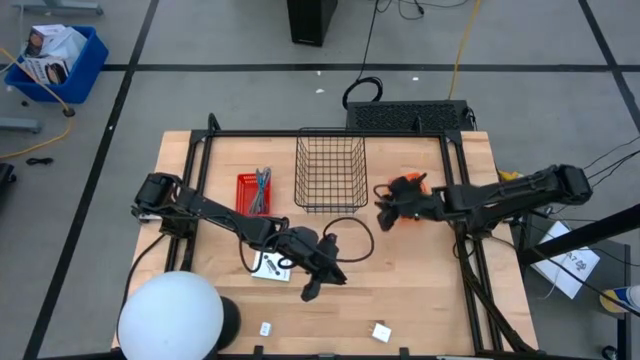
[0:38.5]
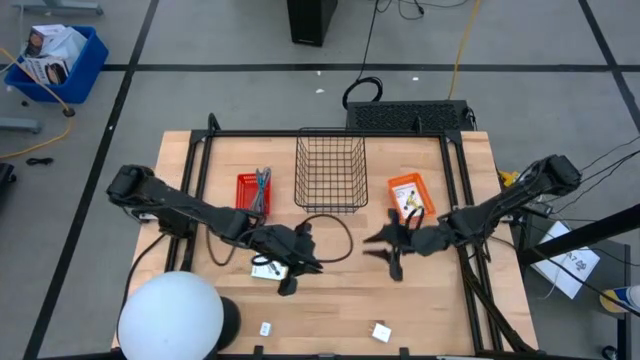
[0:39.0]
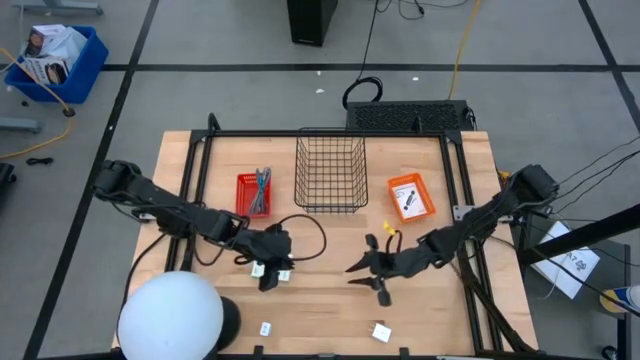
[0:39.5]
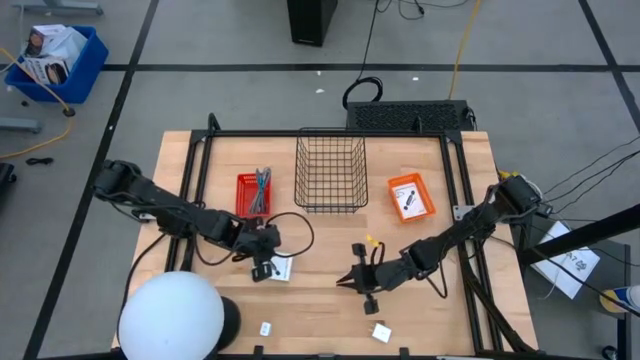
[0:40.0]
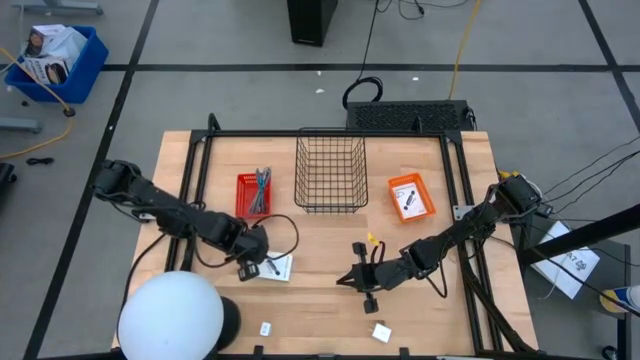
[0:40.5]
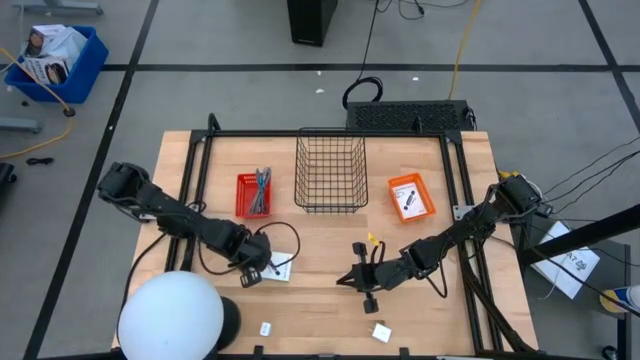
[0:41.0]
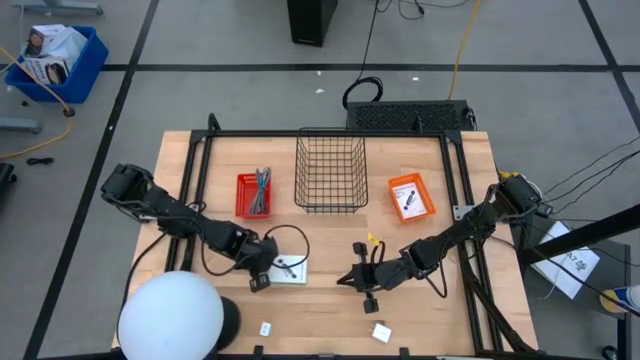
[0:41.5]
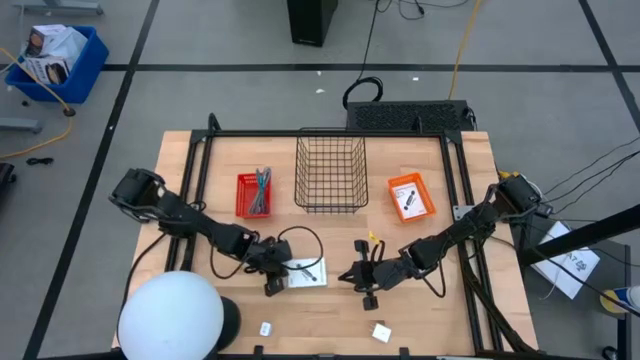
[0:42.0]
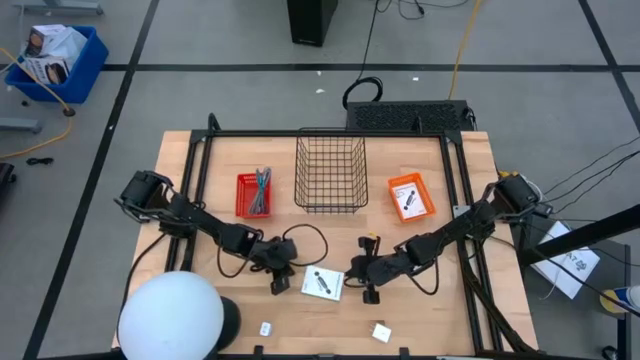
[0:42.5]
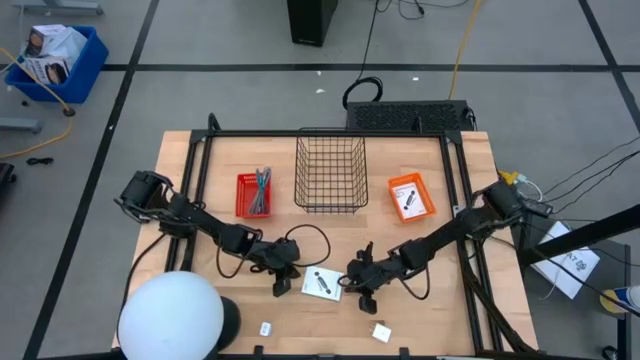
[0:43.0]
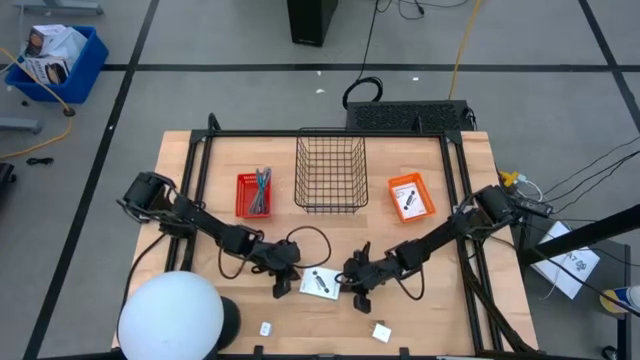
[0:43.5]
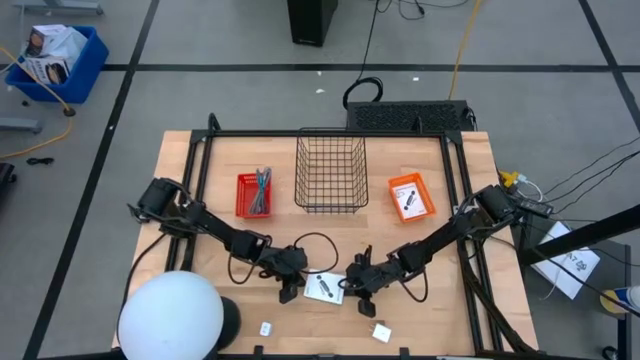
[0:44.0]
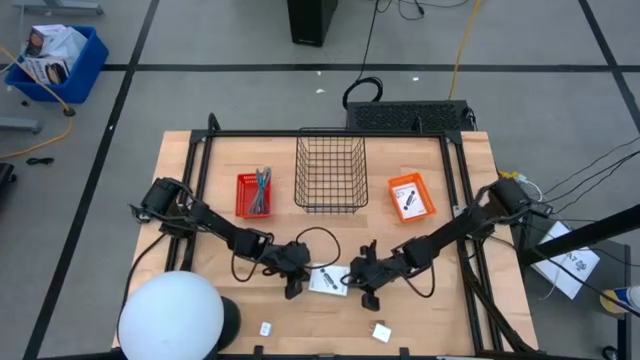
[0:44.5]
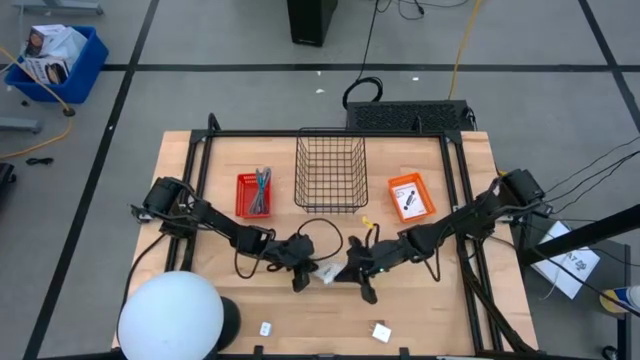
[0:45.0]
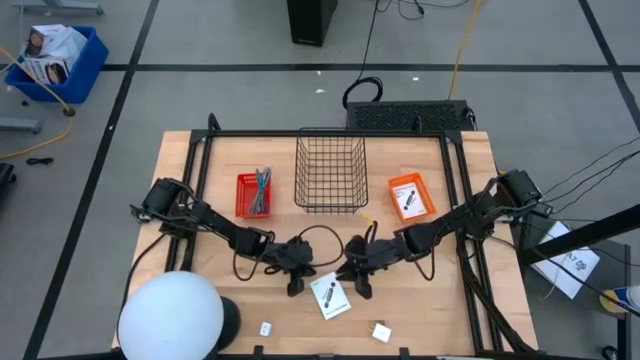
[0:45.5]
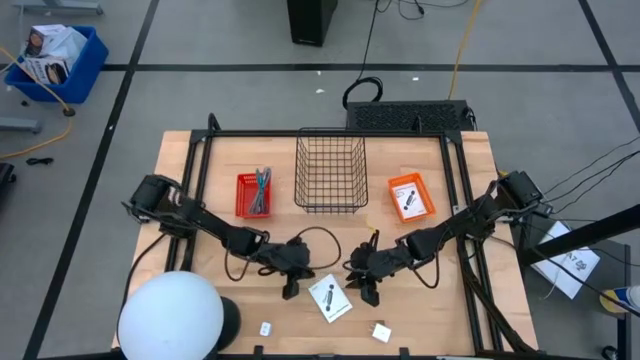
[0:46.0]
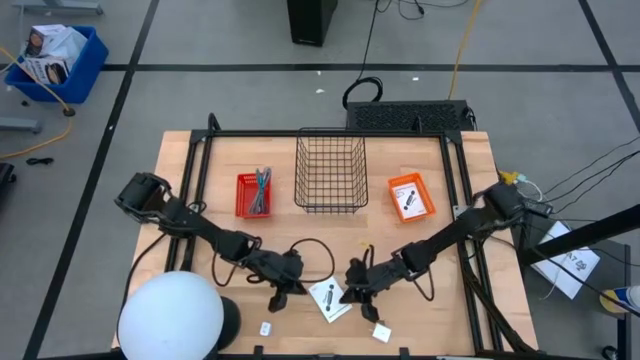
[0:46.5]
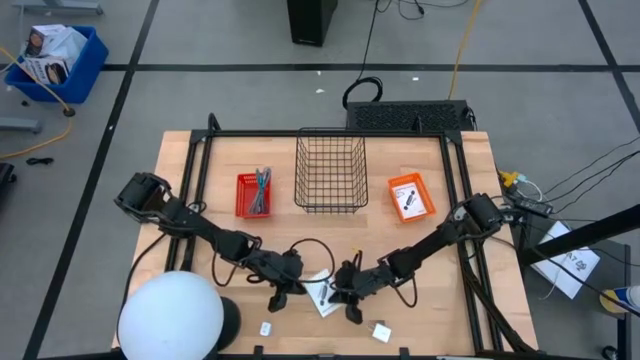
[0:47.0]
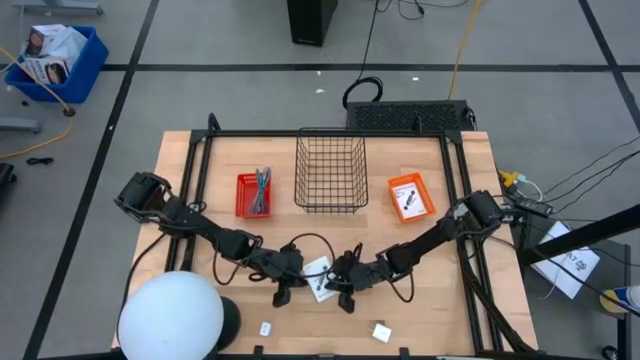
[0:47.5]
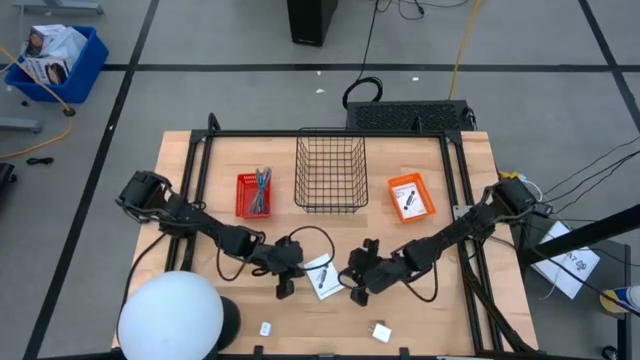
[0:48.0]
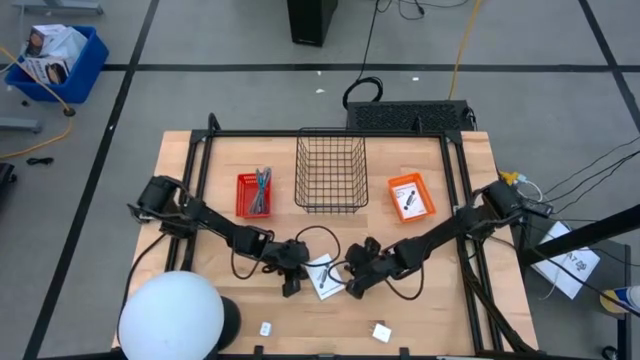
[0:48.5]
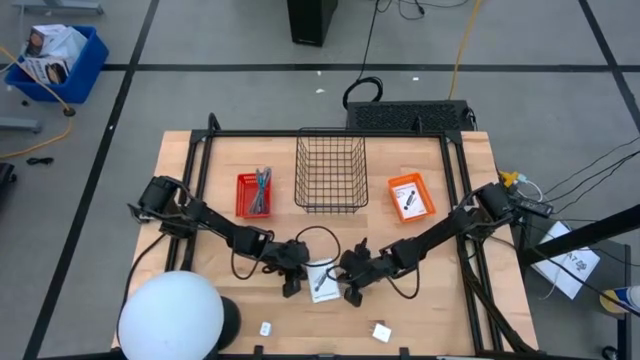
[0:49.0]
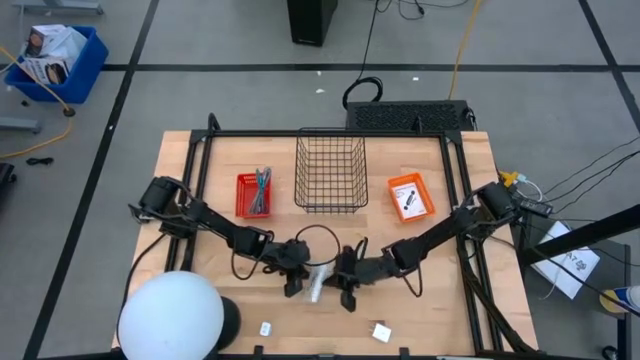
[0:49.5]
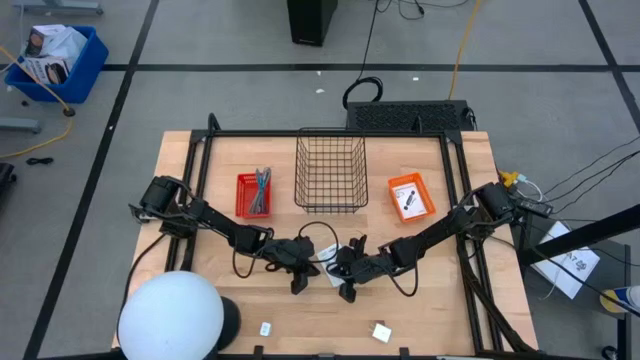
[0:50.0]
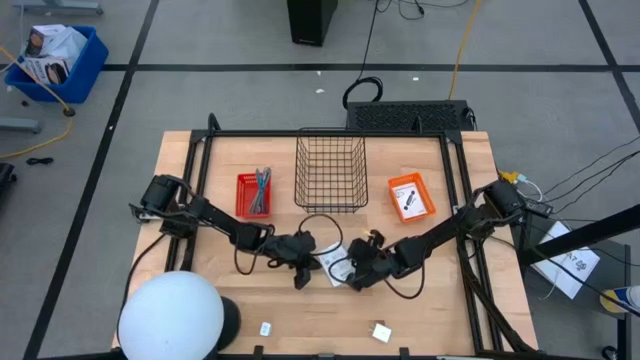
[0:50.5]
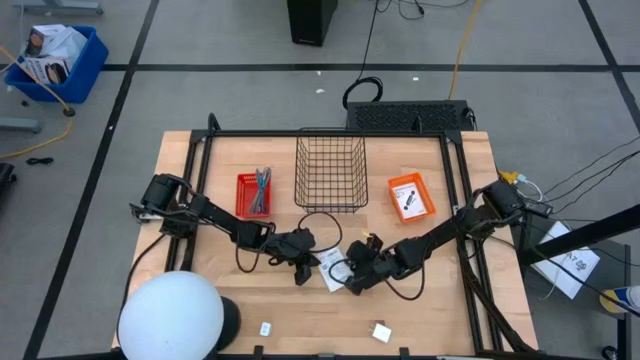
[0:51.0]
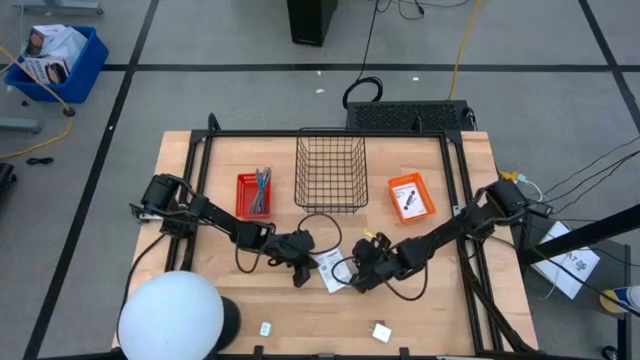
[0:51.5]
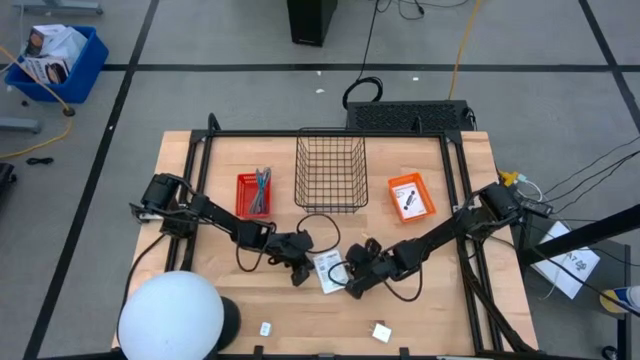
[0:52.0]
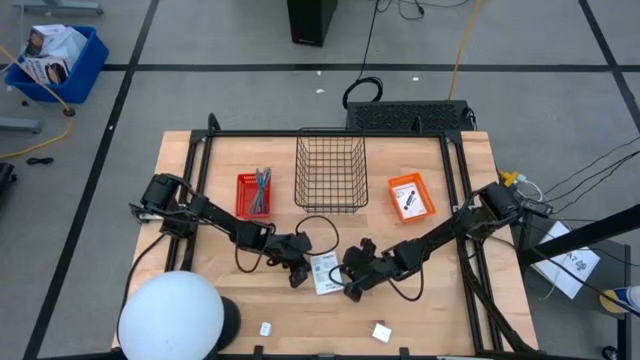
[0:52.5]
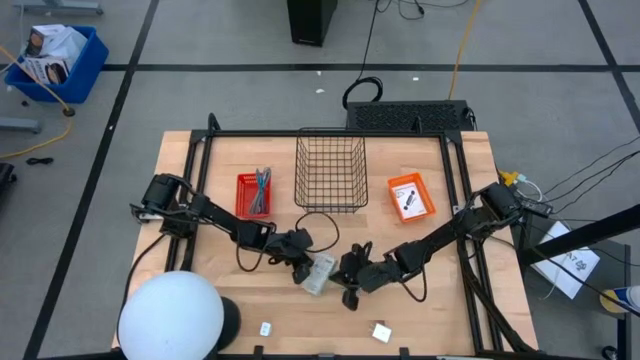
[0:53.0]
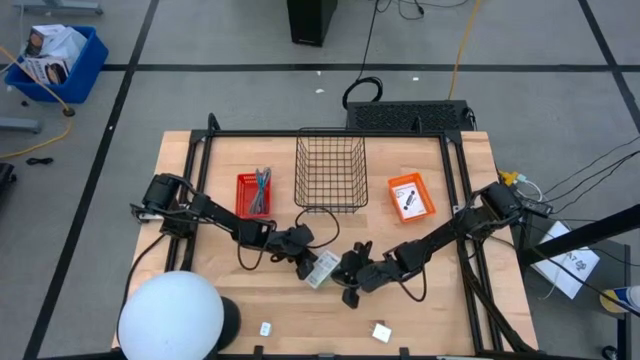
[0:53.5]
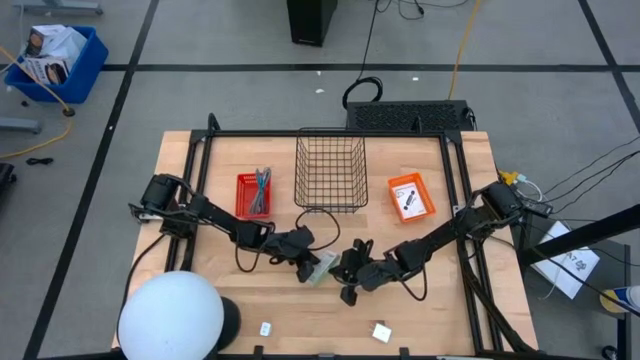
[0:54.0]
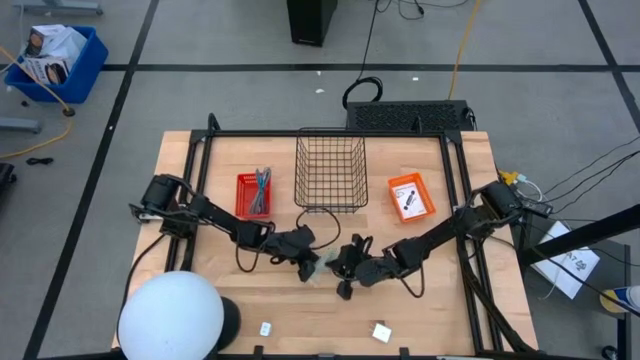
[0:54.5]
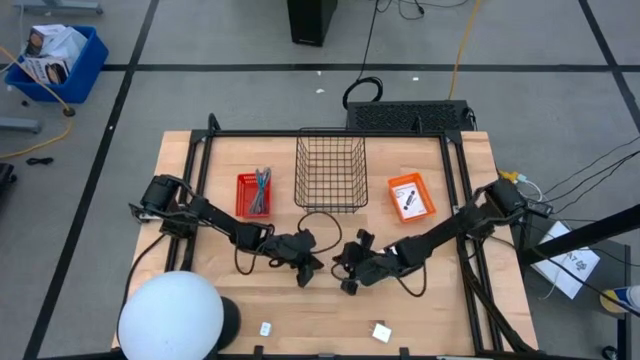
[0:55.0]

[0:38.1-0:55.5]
Task: Pick and place items into bin
Put the card reader box into the orange basket
